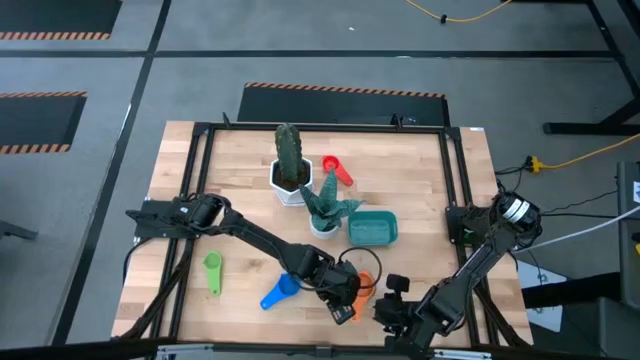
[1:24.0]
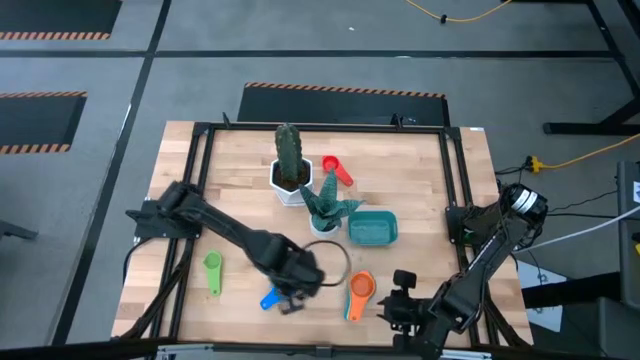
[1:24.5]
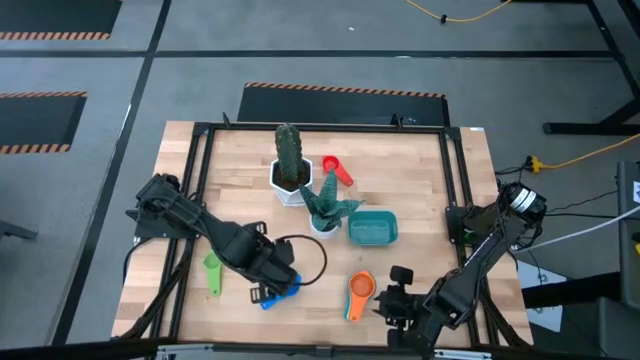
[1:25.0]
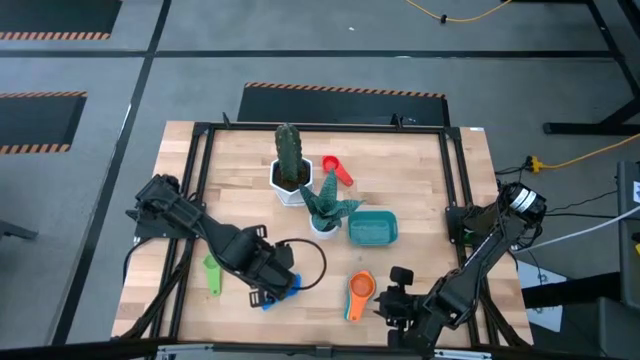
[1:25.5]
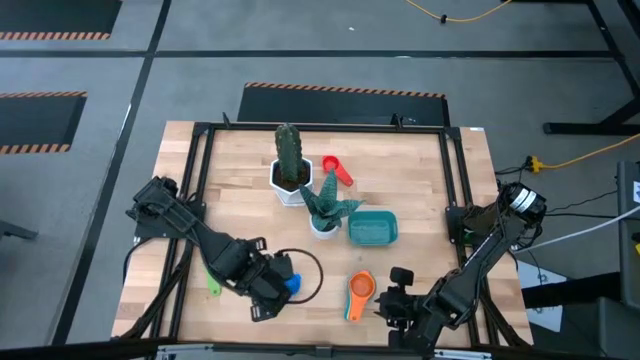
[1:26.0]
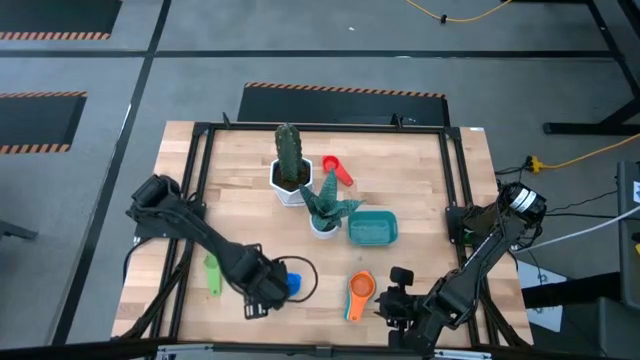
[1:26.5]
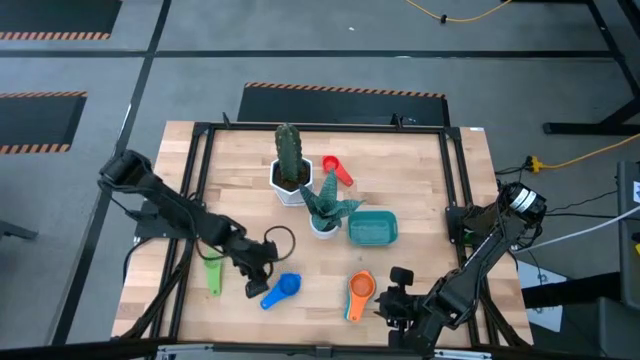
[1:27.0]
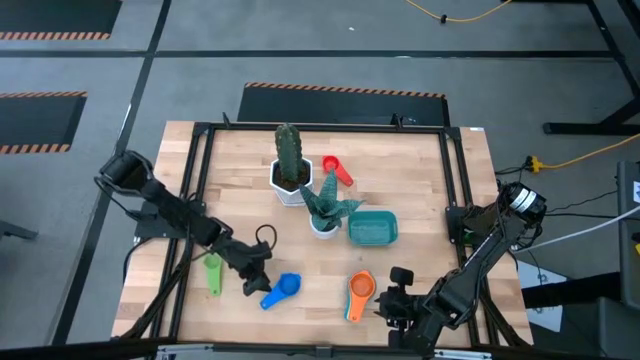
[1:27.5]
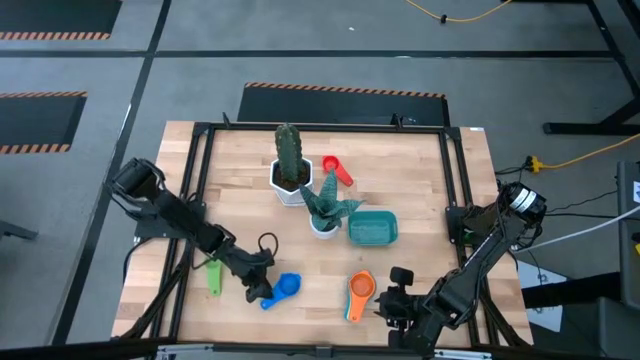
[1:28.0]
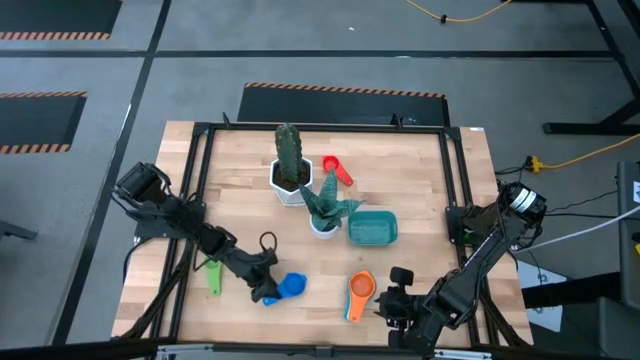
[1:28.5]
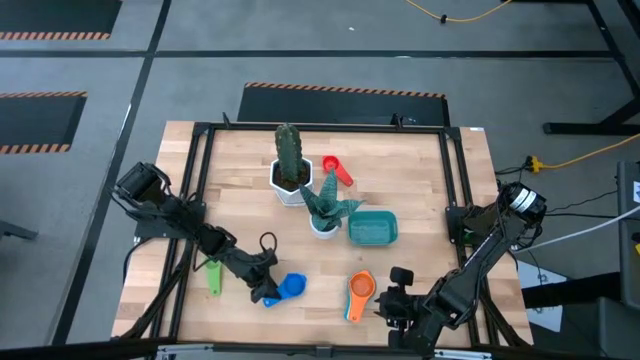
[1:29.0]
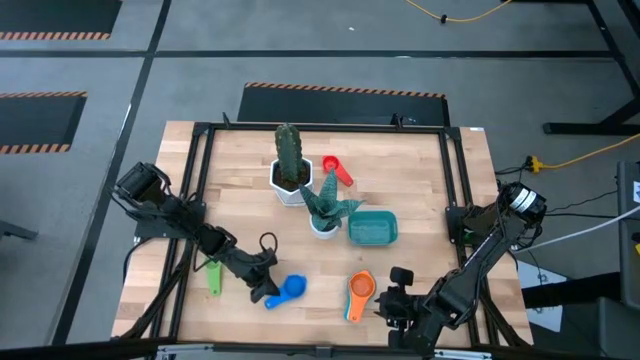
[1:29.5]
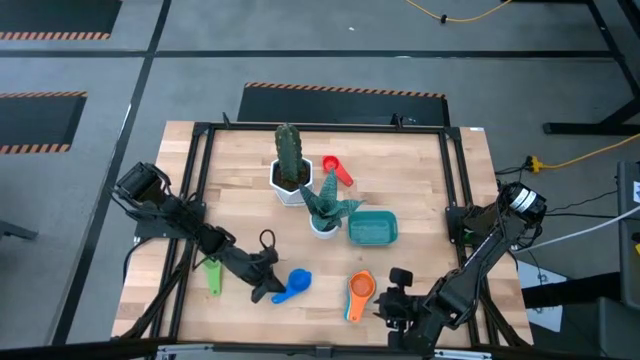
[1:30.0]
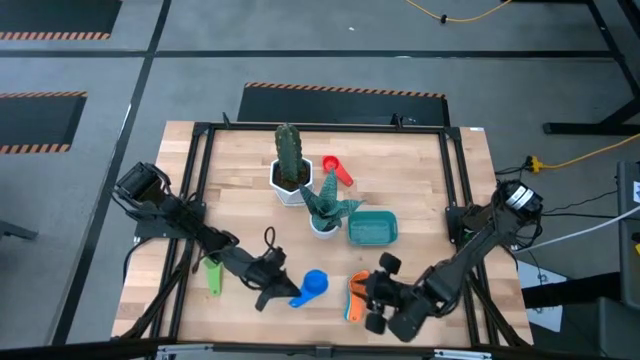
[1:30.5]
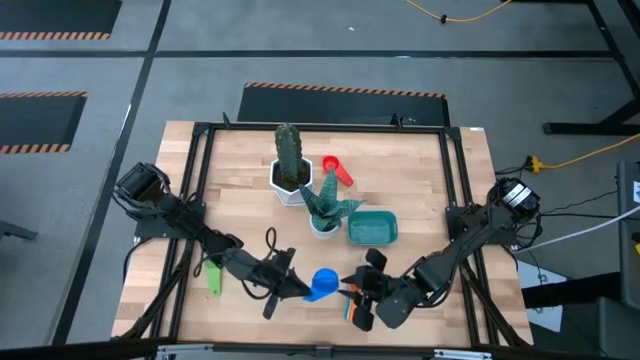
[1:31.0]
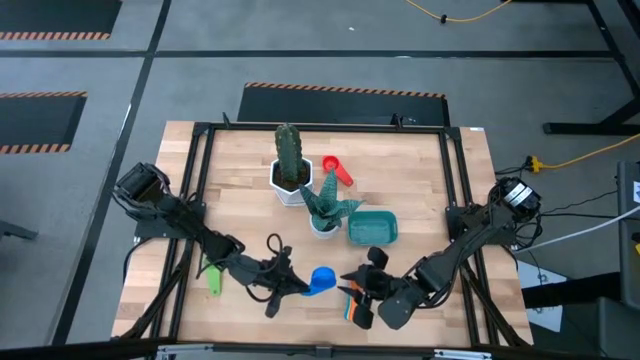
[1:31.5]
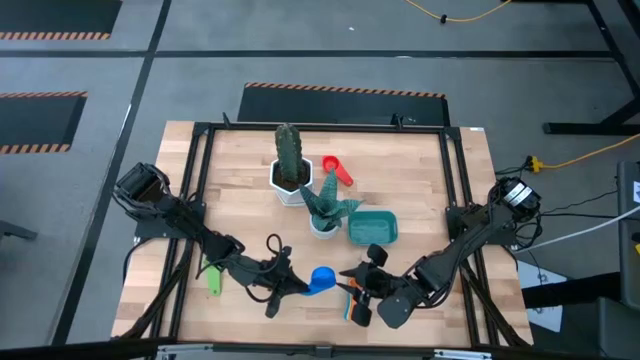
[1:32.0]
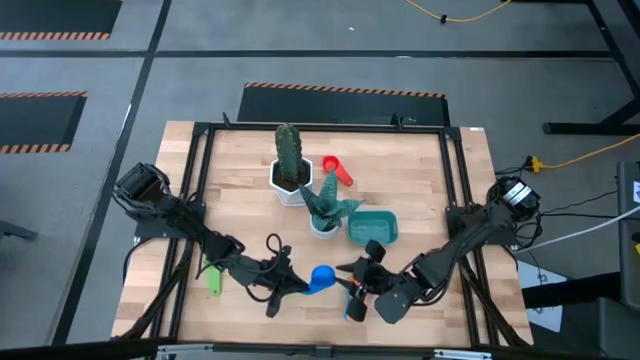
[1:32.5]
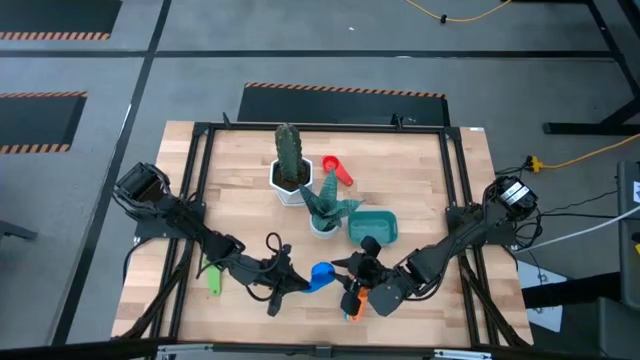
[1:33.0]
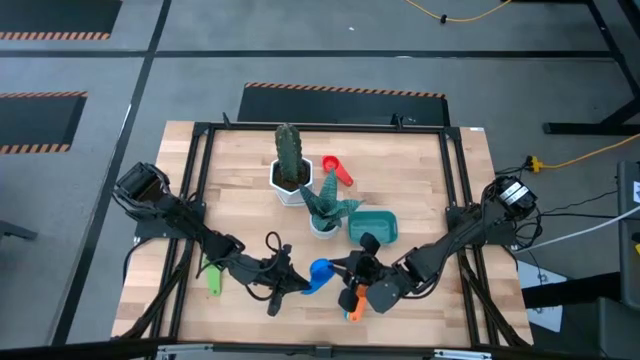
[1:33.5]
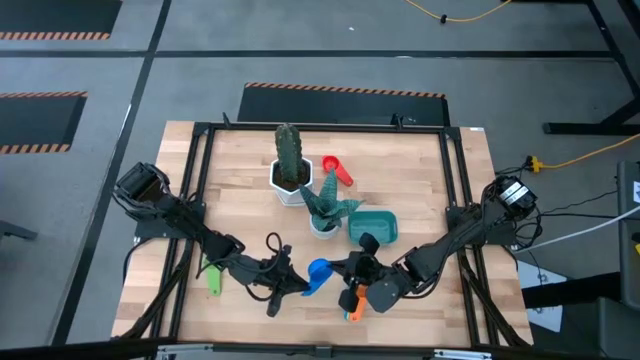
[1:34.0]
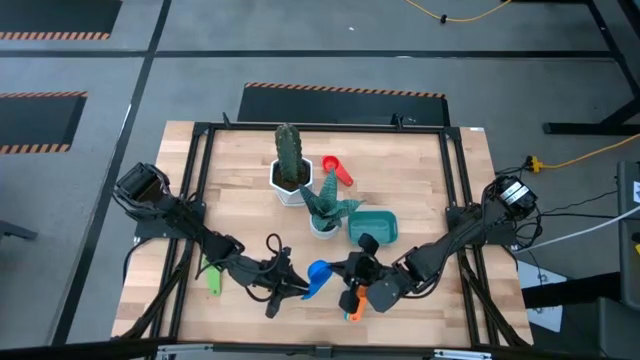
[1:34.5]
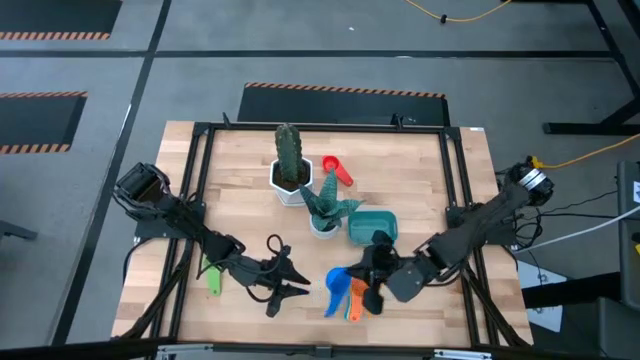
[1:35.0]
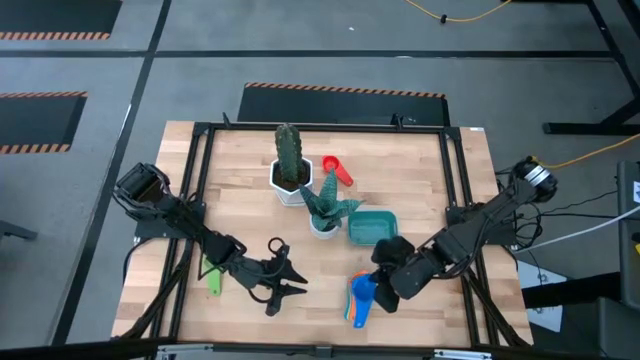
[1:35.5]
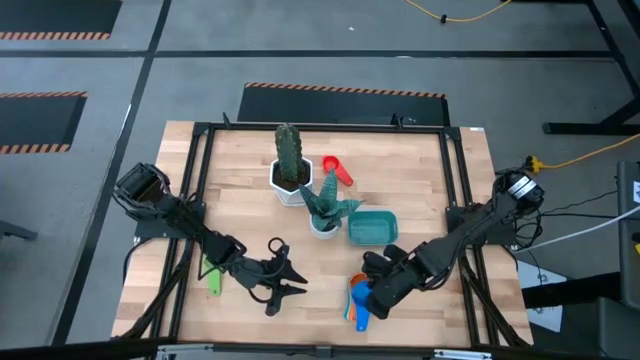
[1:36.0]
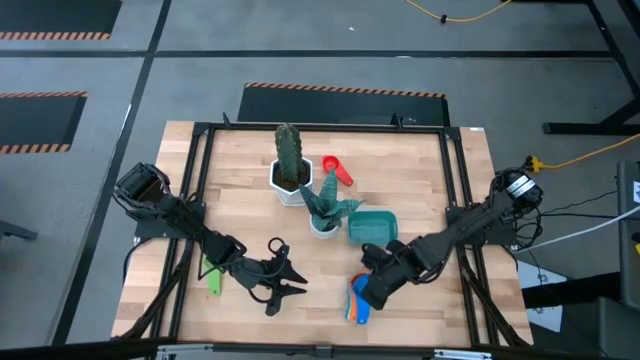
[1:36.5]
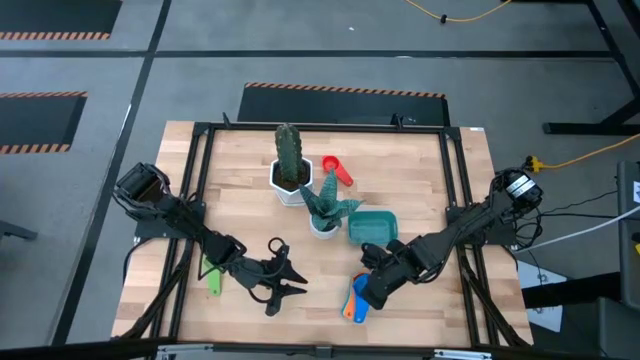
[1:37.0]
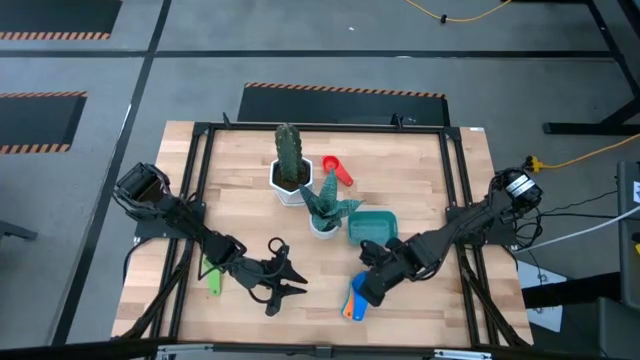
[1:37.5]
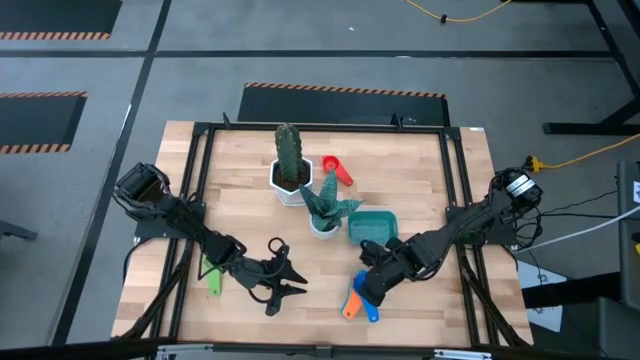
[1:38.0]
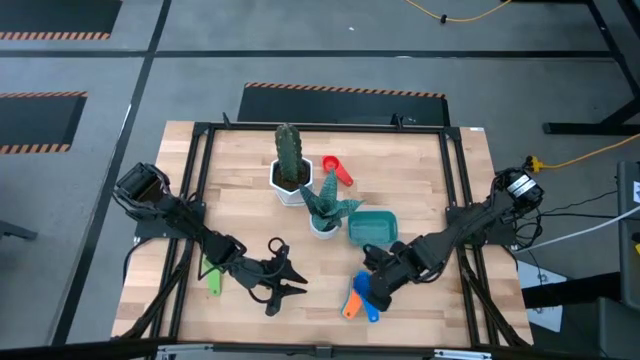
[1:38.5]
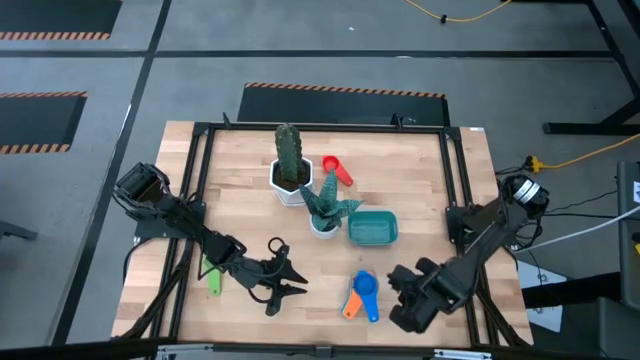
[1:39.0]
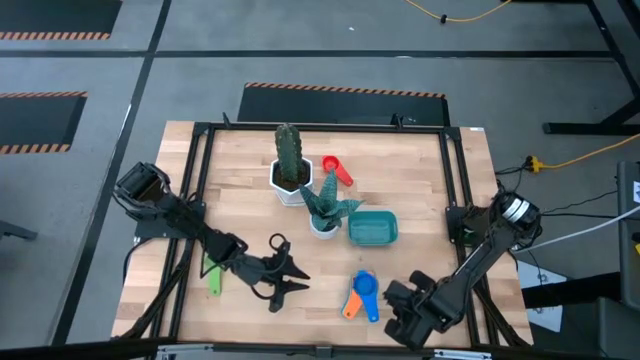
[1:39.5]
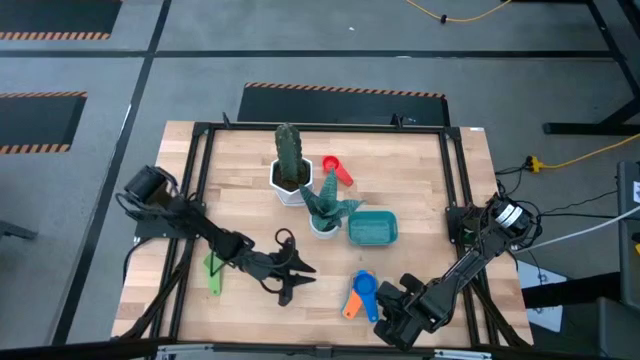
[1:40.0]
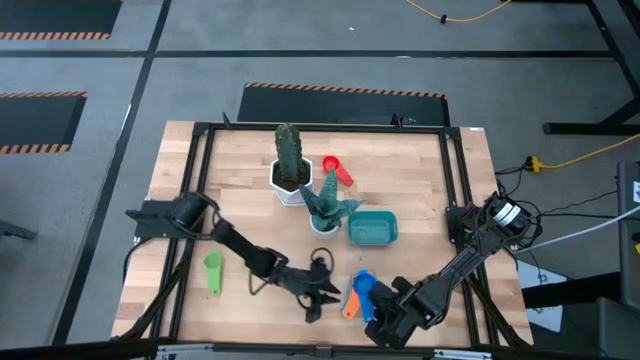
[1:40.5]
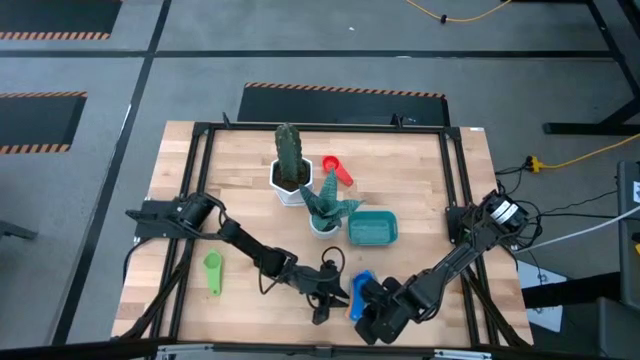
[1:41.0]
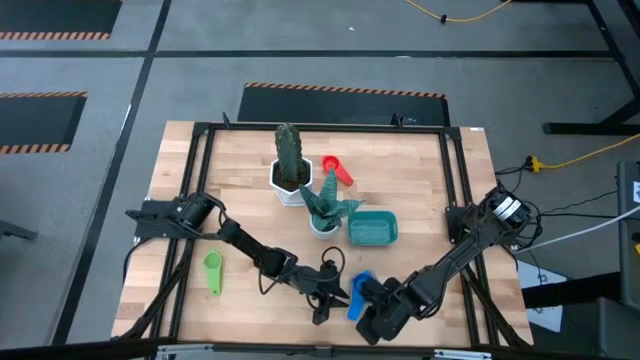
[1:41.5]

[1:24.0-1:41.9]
Task: Nest measuring cups in basket
Stack the blue measuring cup on top of the orange measuring cup

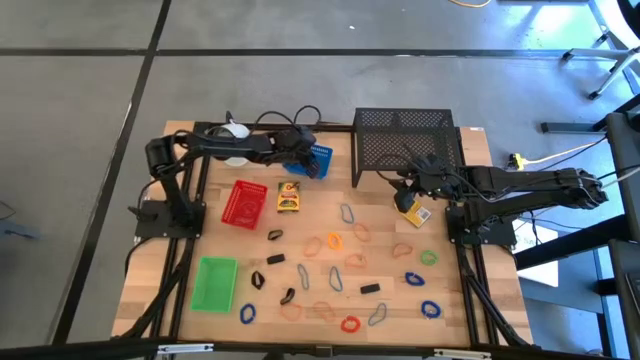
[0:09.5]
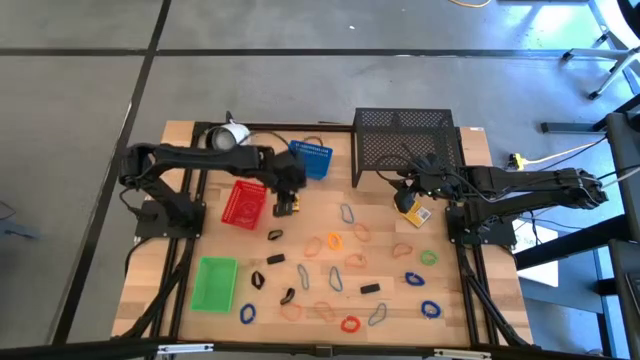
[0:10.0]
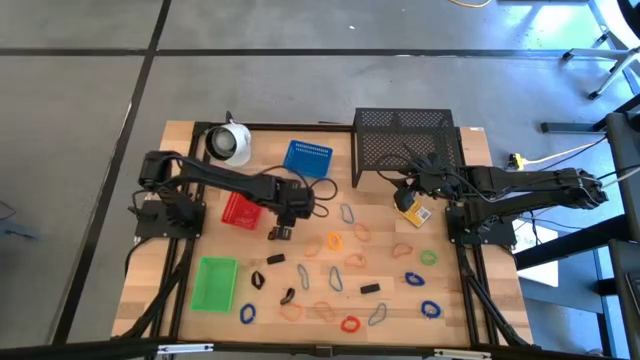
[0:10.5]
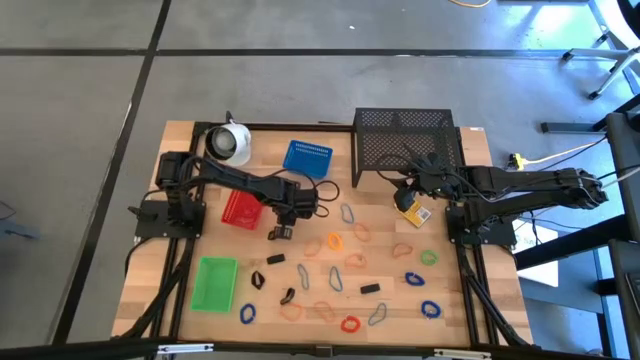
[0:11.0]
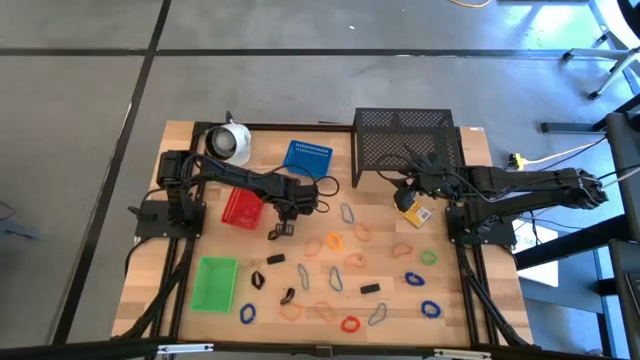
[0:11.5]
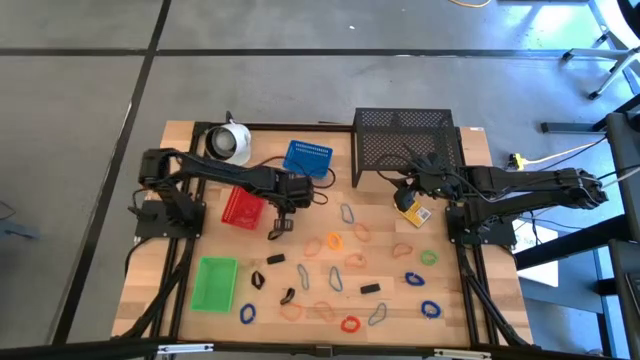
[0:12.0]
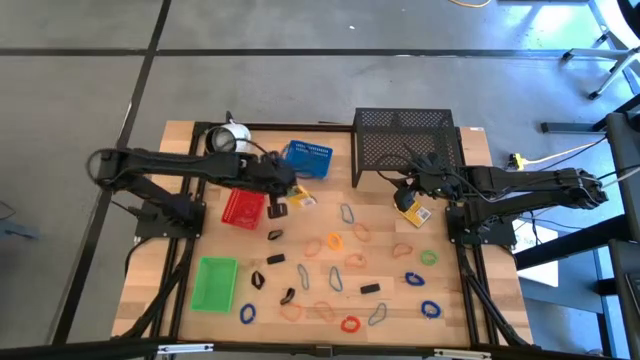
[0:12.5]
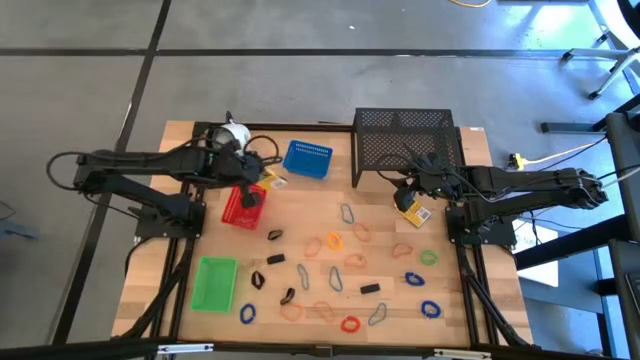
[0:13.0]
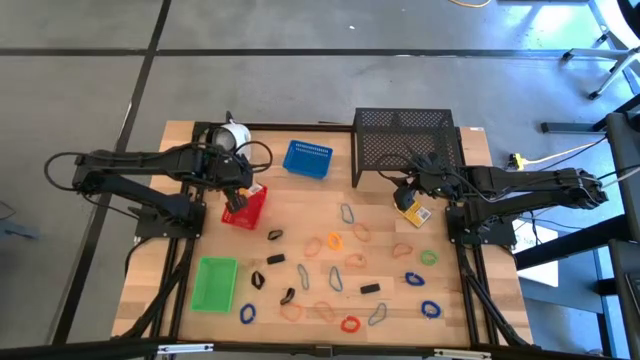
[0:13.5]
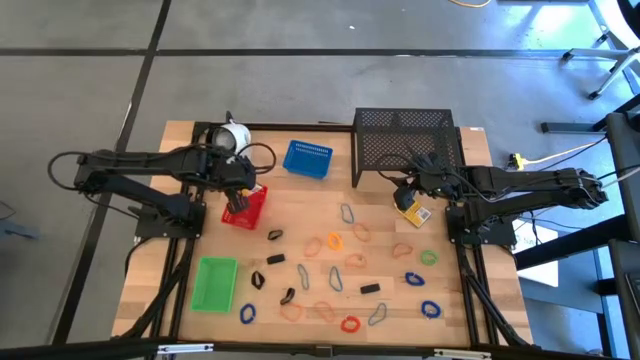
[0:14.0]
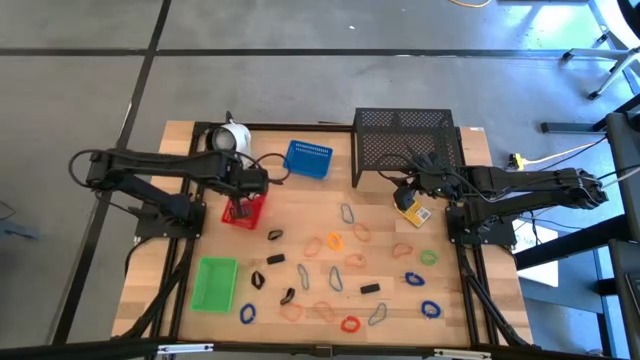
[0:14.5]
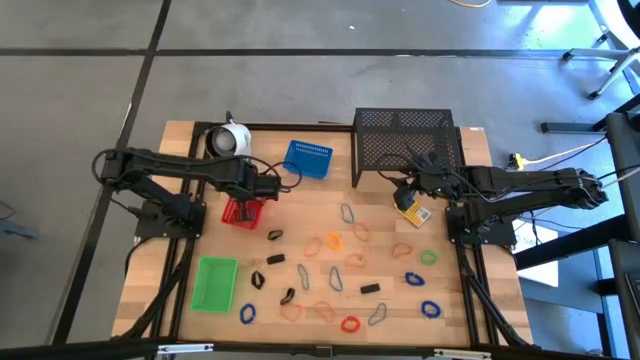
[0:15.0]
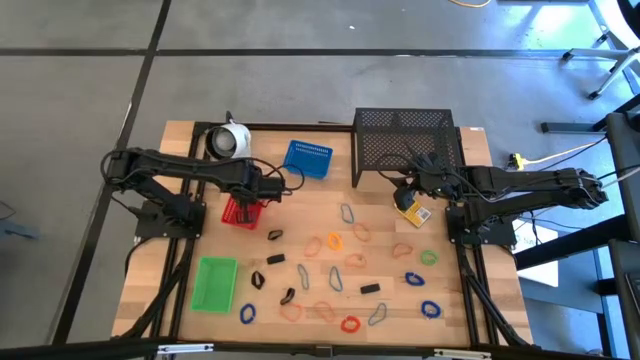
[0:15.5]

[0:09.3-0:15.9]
Task: Pick & Place Office Desk Supplies
Put the yellow crayon box into the red bin
